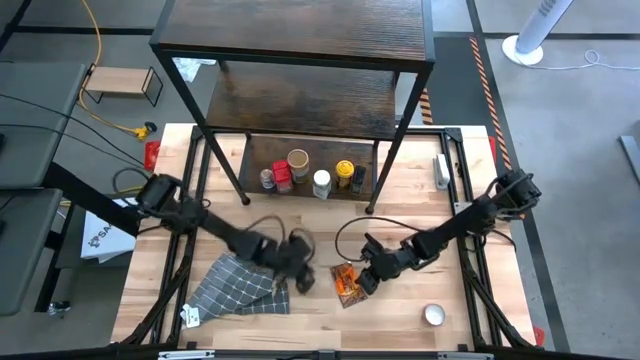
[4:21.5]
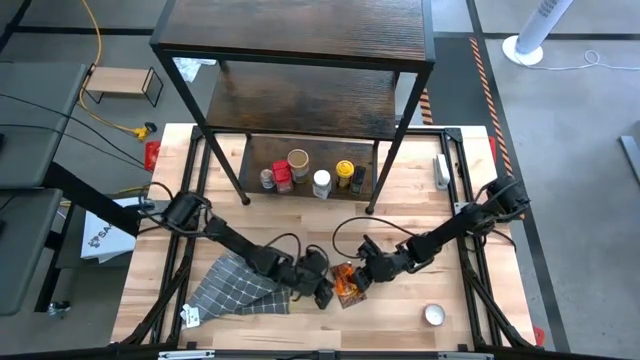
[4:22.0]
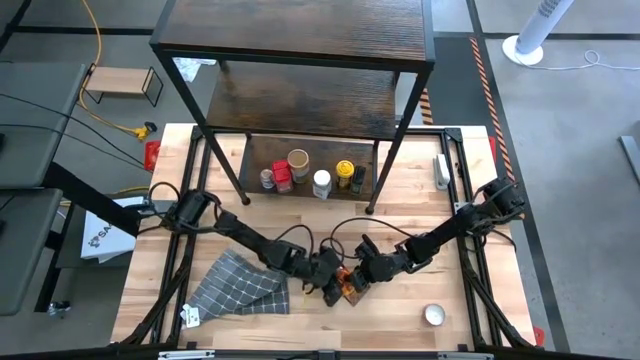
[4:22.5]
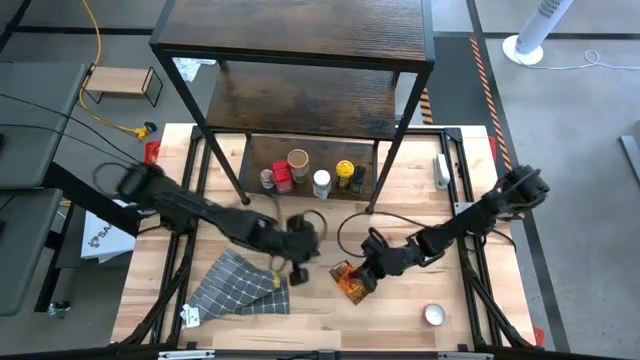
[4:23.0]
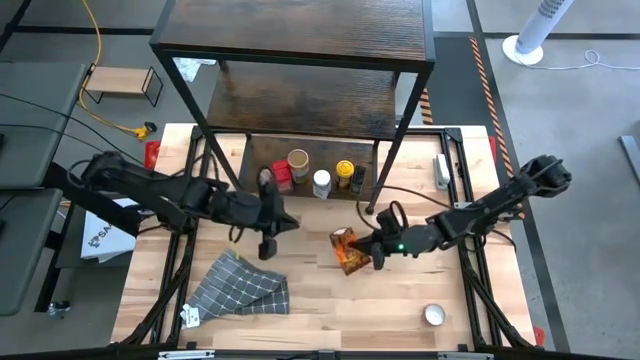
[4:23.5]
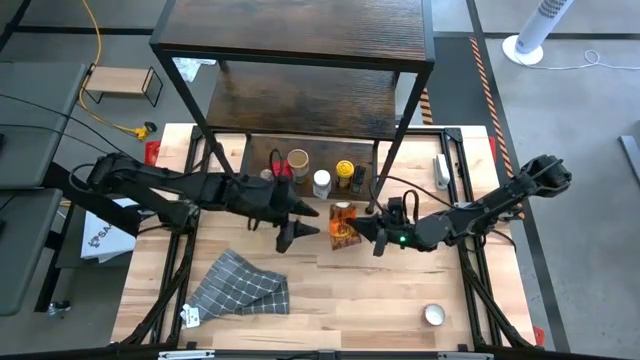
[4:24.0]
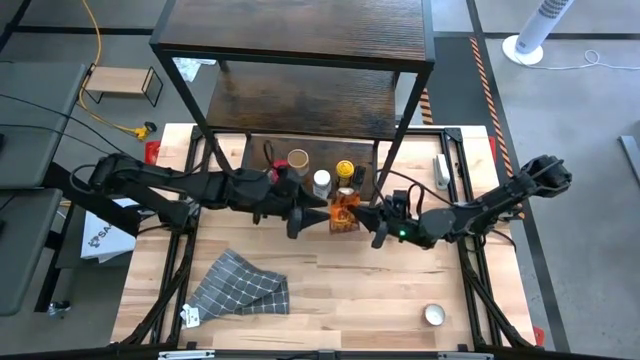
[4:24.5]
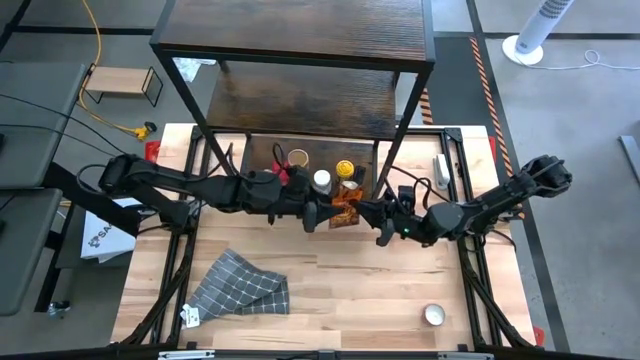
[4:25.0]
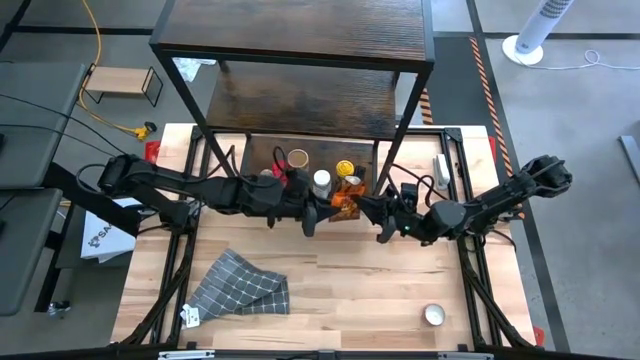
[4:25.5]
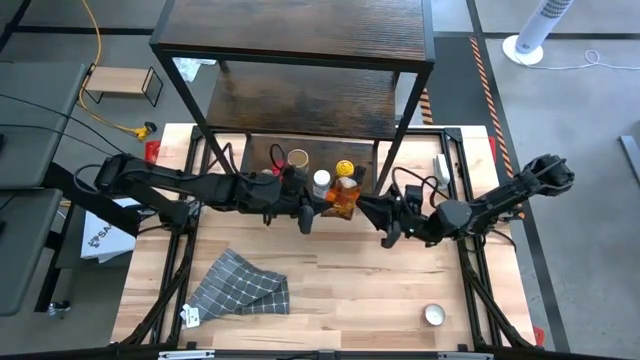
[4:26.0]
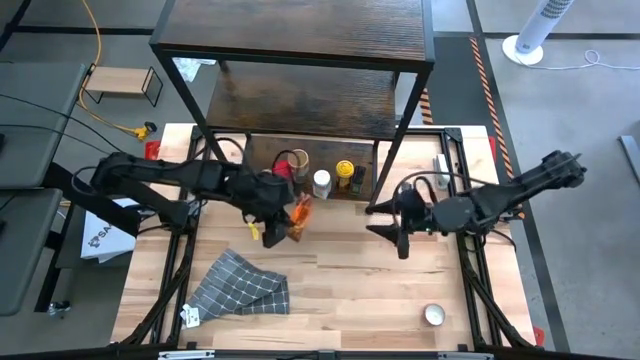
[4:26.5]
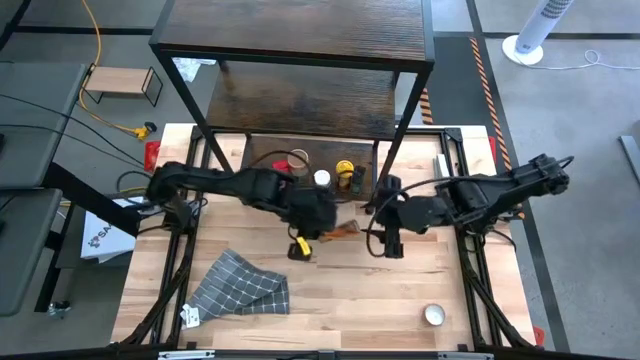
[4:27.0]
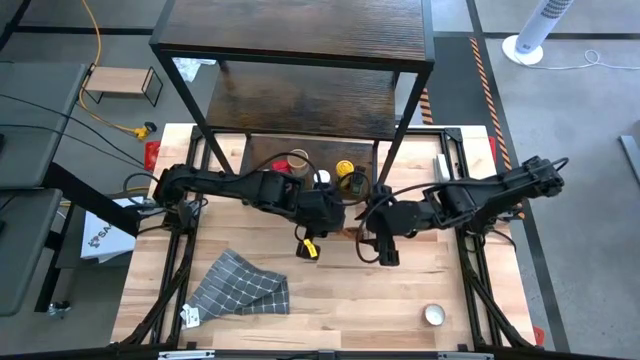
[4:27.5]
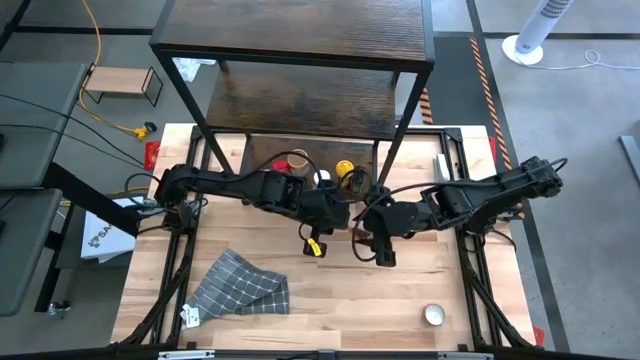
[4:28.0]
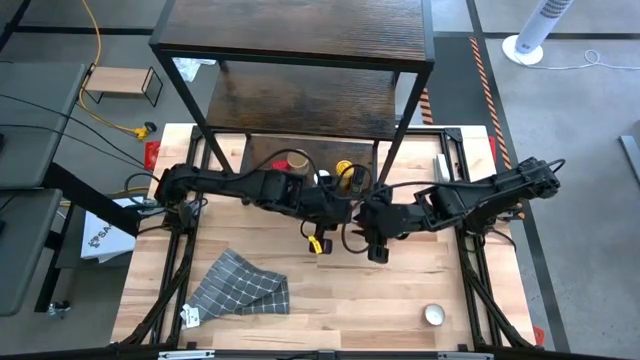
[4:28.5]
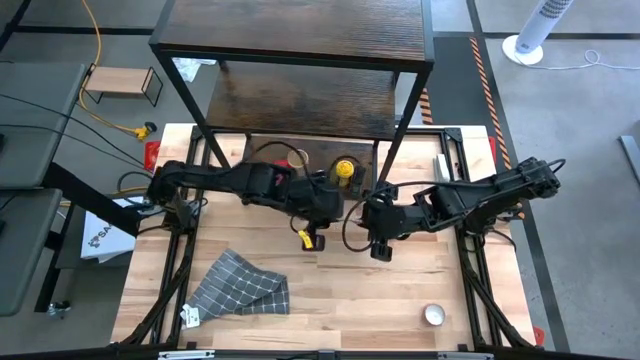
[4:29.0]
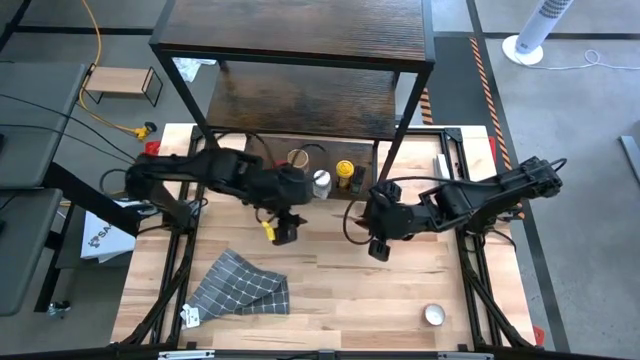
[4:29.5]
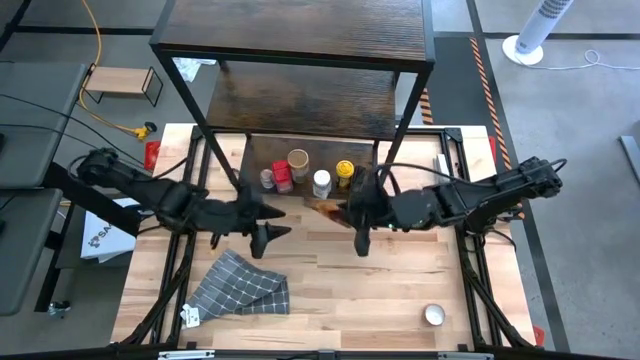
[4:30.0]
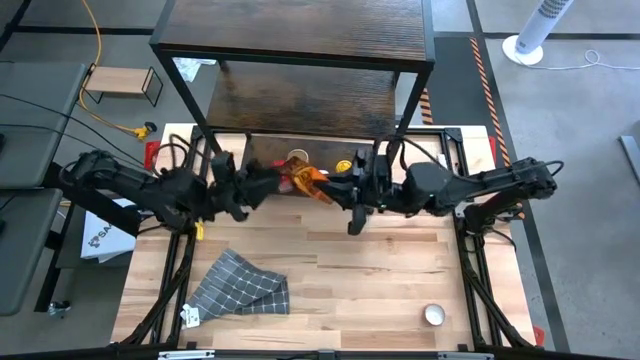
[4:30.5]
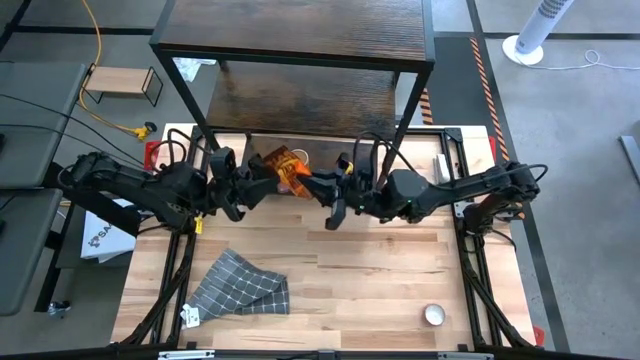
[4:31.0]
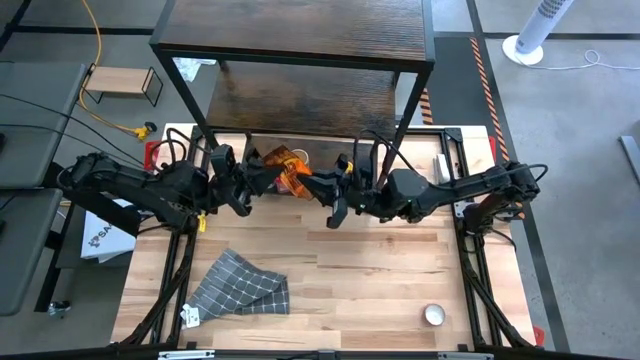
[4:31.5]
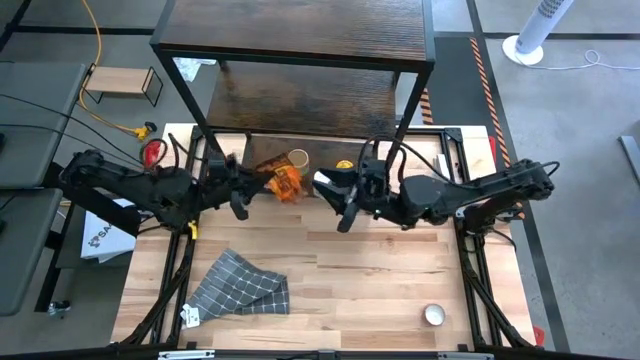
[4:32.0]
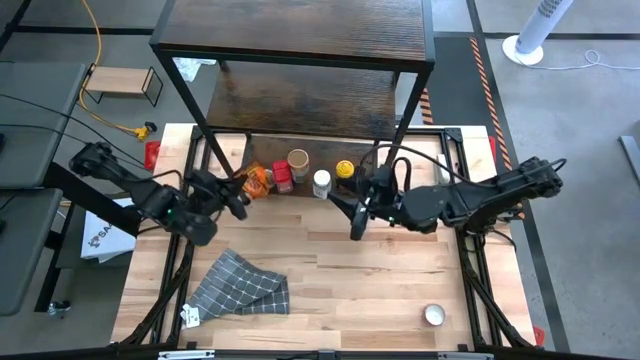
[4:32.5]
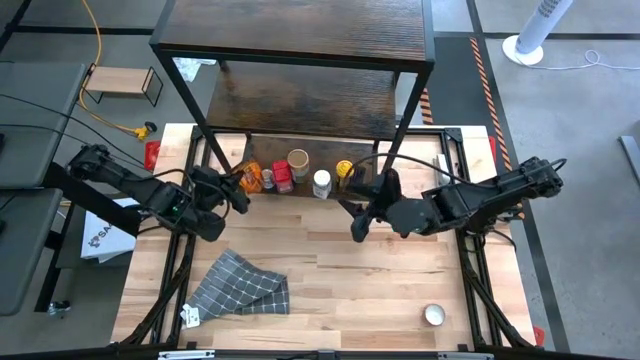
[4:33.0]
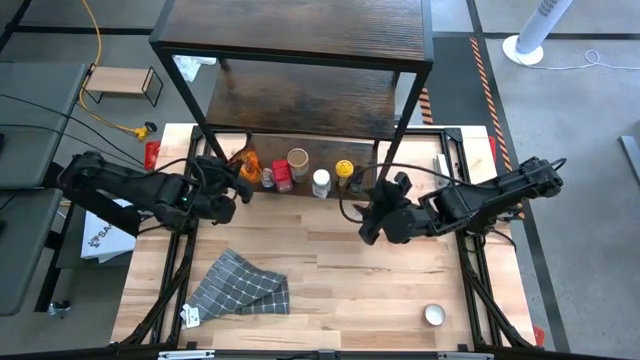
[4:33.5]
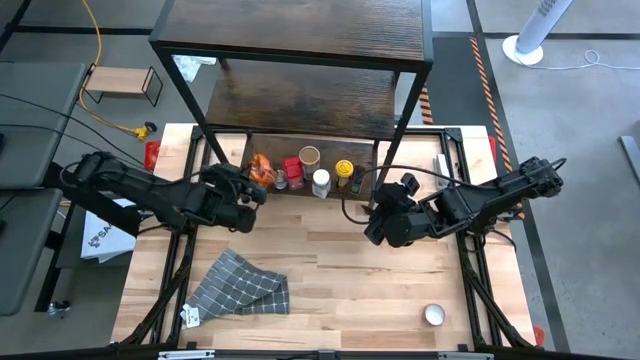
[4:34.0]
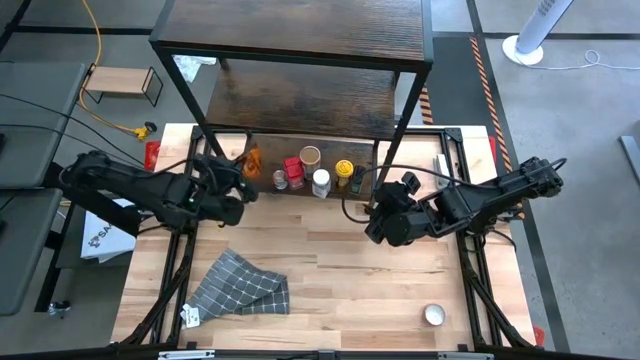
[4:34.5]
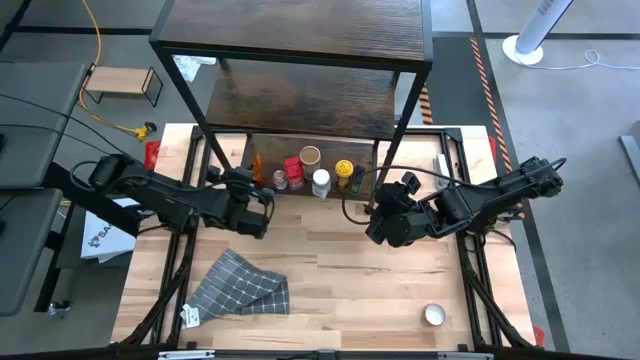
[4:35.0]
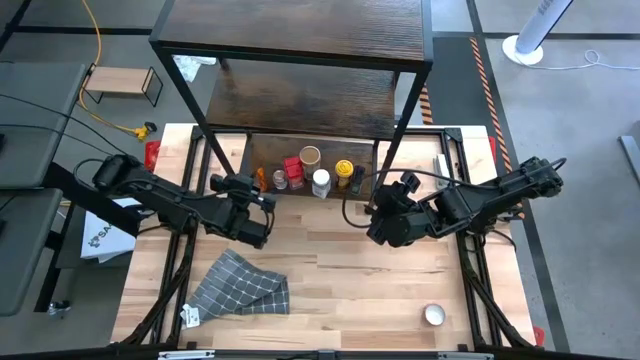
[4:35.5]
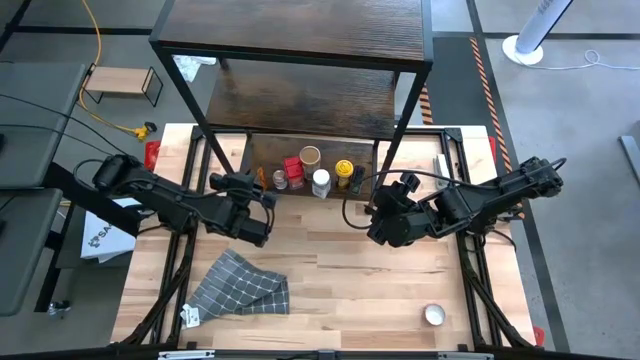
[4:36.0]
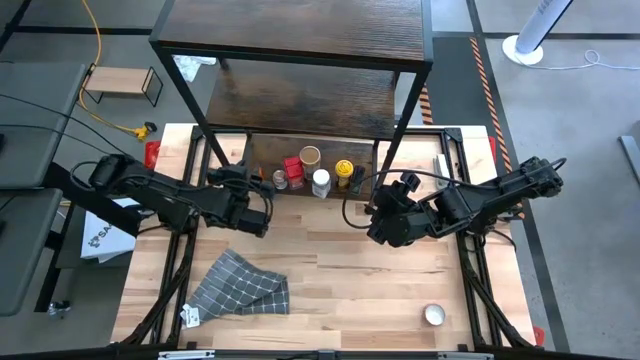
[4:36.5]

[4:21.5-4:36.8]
Task: Shelf spices
Put the orange seasoning pack on the shelf

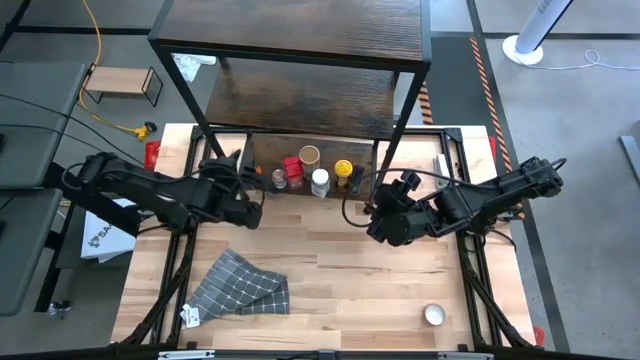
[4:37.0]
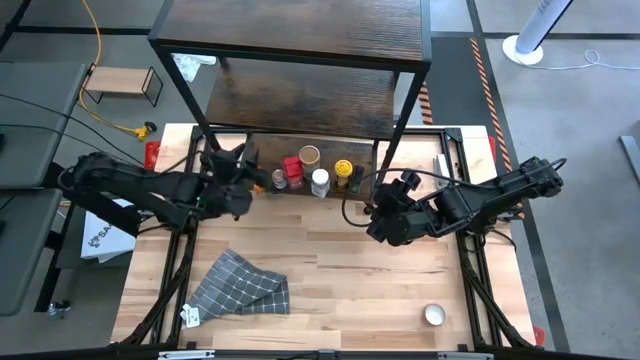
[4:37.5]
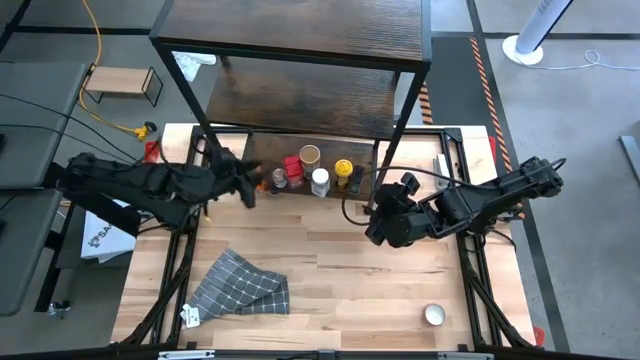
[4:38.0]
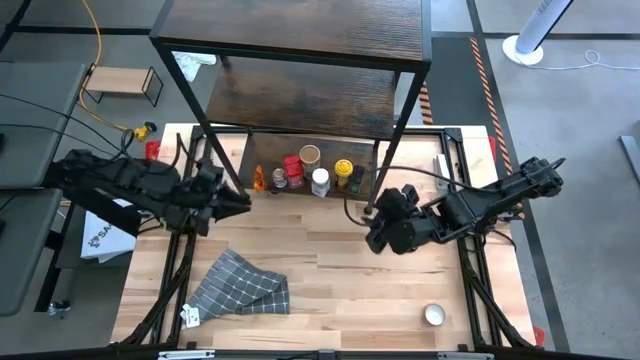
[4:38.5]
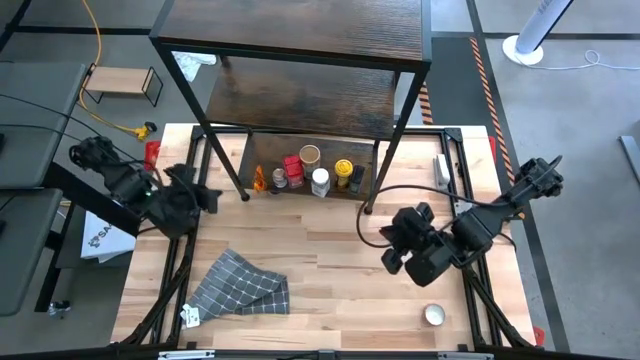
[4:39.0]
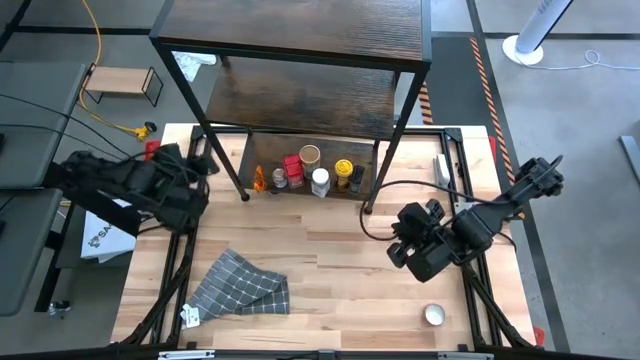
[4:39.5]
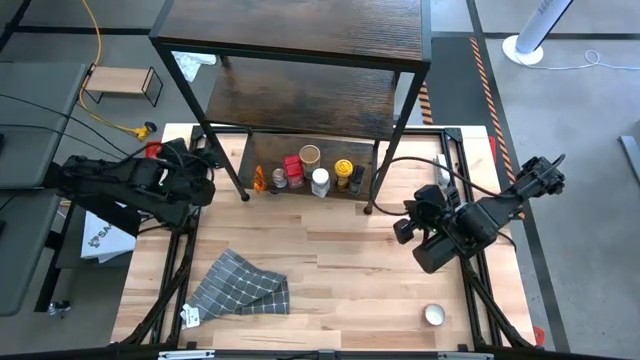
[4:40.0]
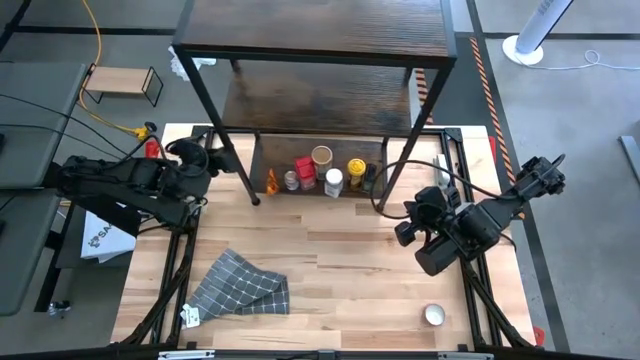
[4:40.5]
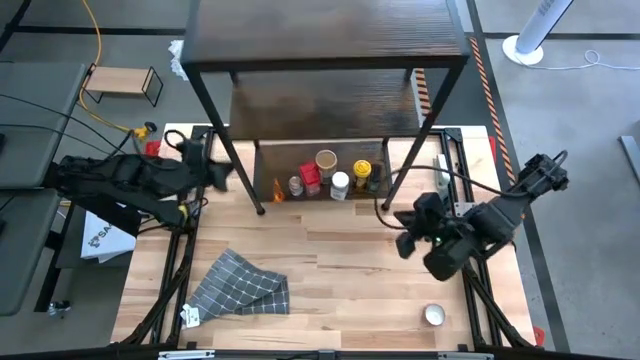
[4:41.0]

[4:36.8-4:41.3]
Adjust the shelf

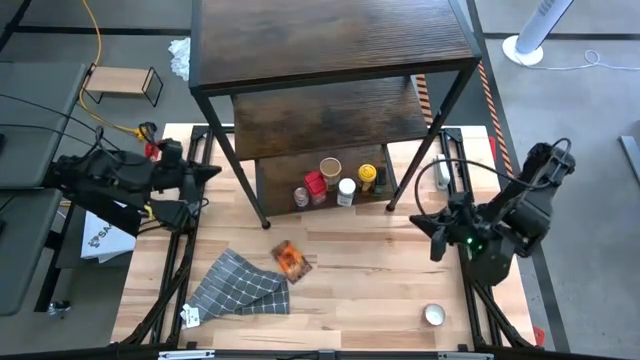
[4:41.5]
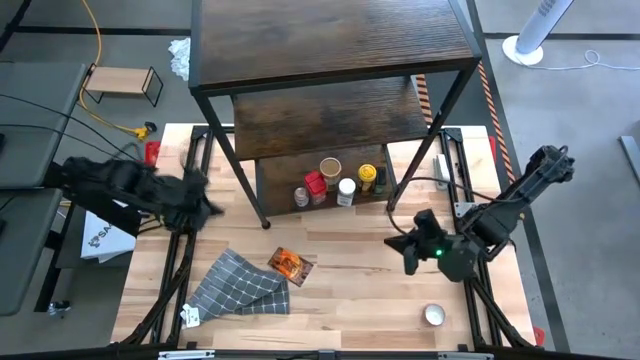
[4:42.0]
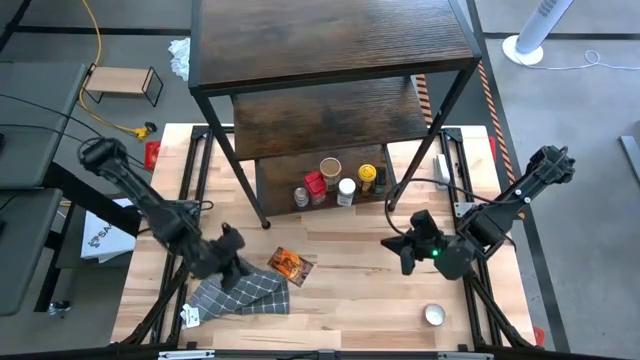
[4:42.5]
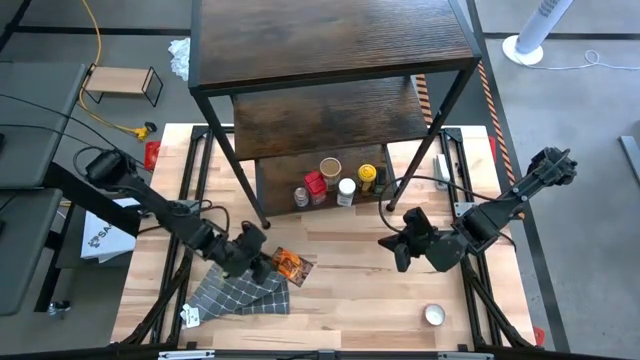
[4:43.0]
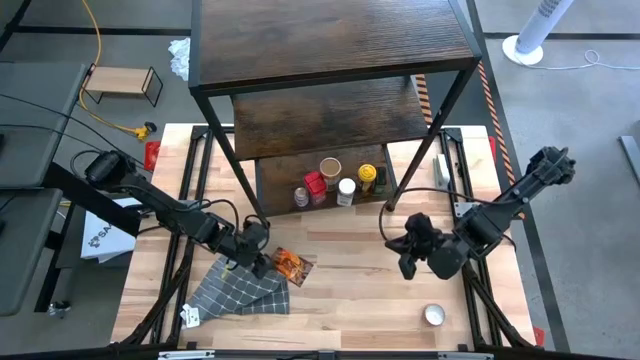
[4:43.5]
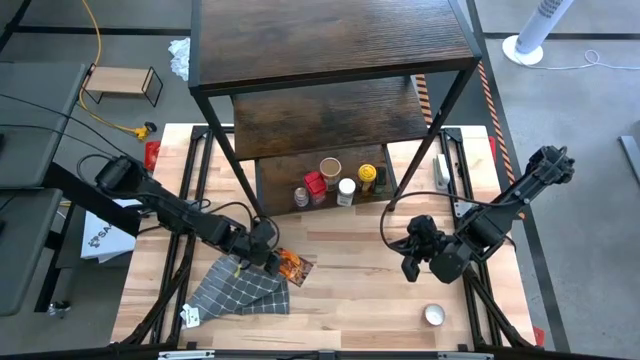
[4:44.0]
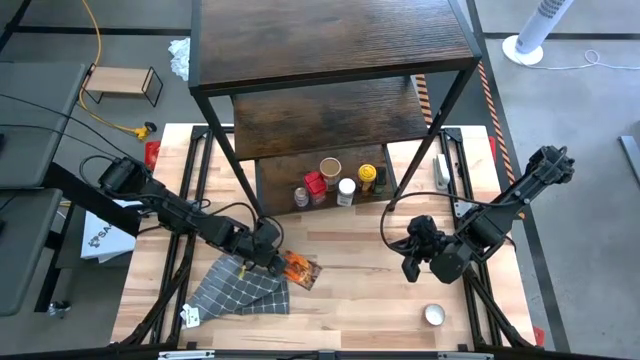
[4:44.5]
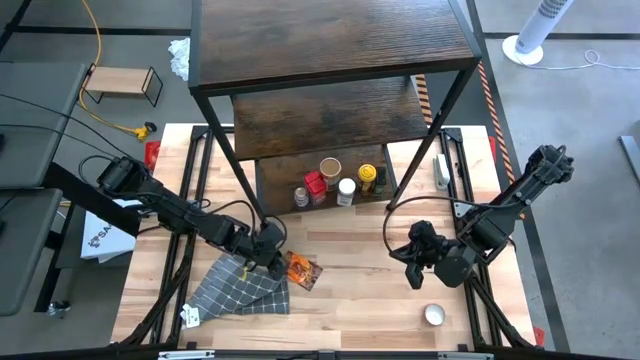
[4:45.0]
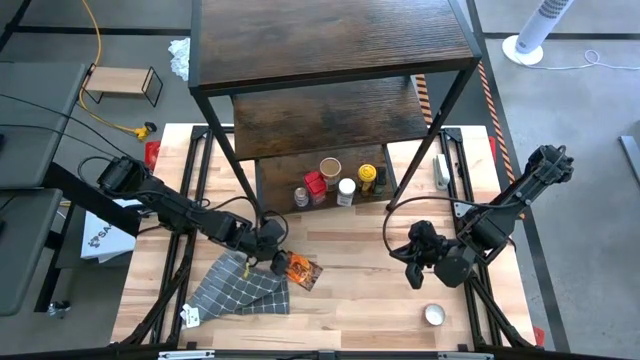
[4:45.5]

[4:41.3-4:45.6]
Put the orange seasoning pack on the shelf
